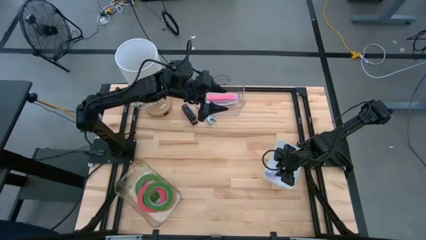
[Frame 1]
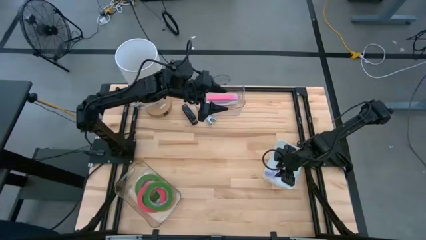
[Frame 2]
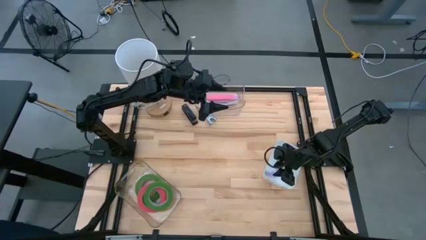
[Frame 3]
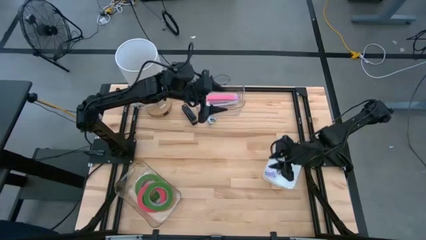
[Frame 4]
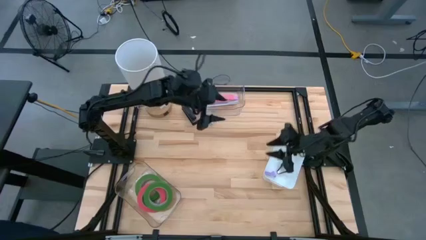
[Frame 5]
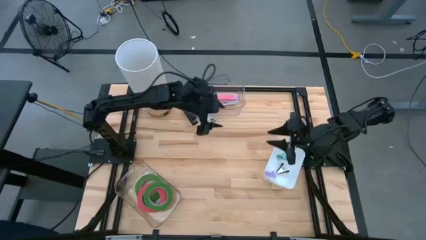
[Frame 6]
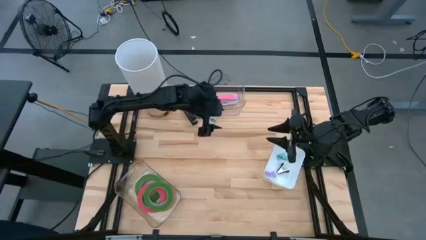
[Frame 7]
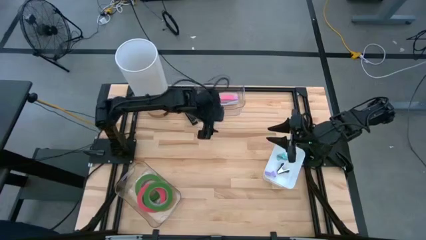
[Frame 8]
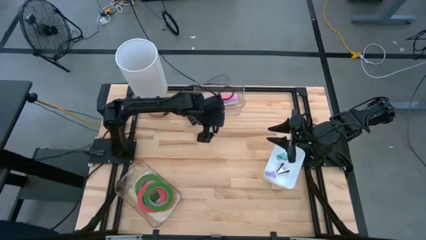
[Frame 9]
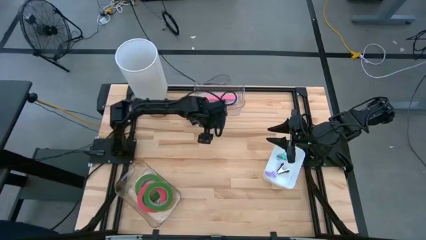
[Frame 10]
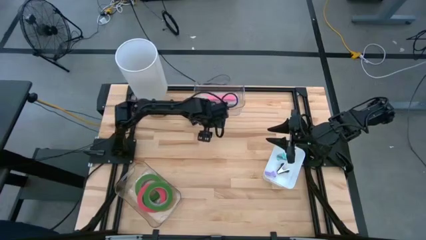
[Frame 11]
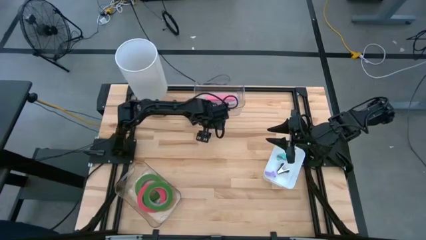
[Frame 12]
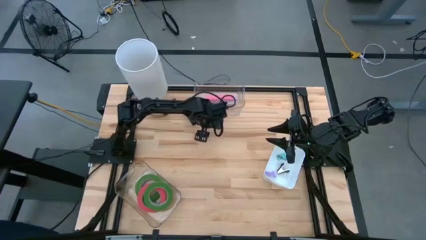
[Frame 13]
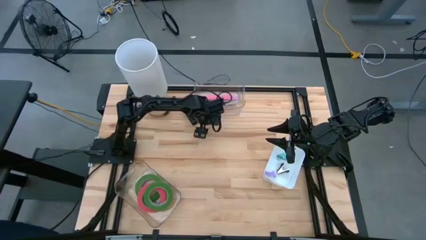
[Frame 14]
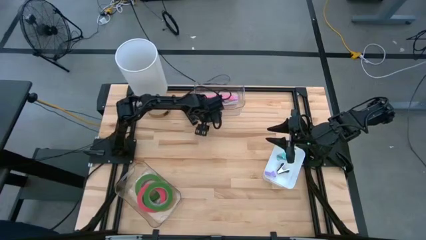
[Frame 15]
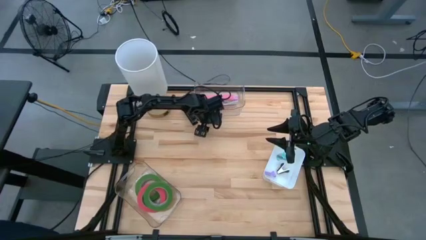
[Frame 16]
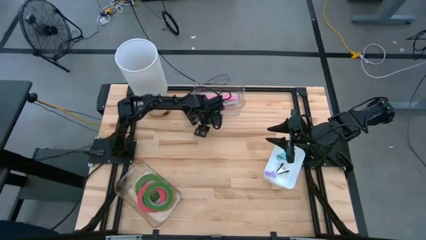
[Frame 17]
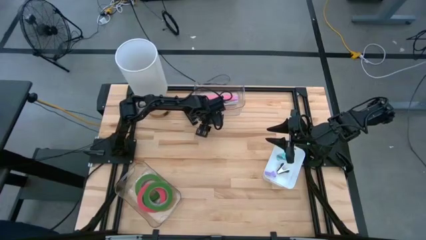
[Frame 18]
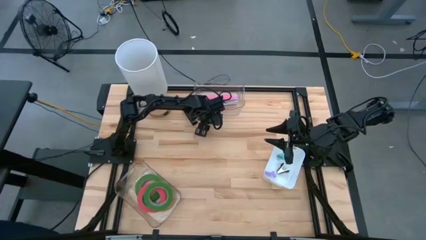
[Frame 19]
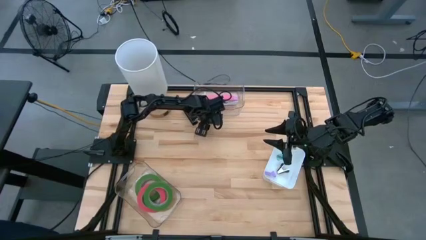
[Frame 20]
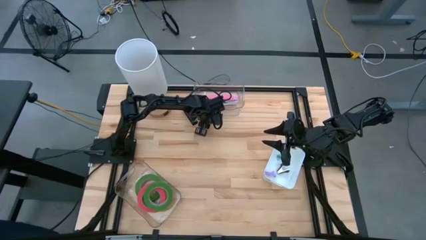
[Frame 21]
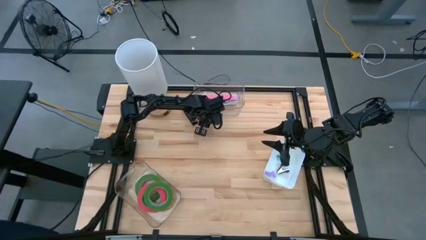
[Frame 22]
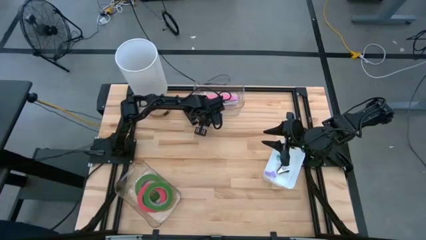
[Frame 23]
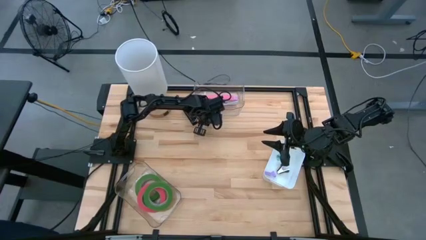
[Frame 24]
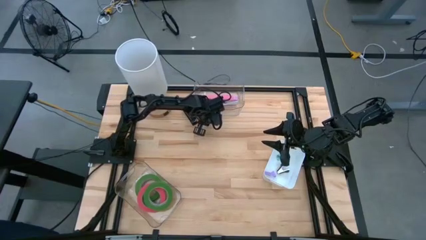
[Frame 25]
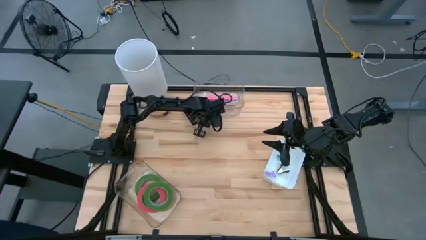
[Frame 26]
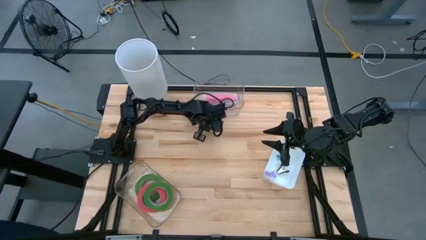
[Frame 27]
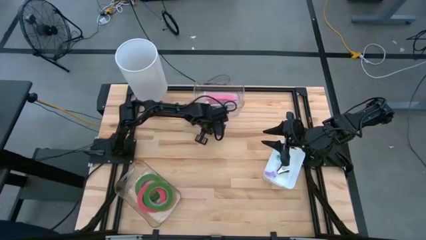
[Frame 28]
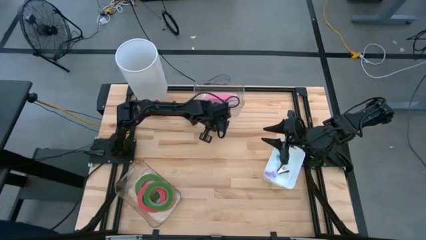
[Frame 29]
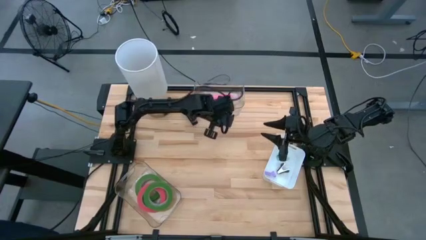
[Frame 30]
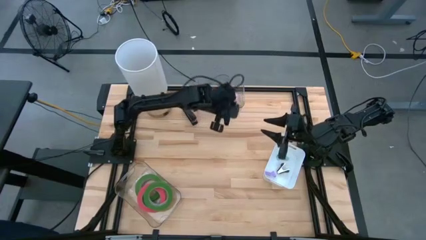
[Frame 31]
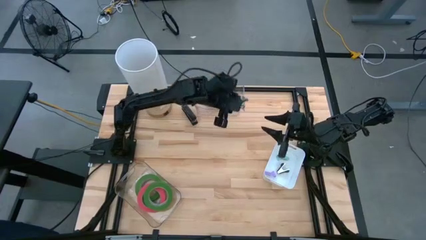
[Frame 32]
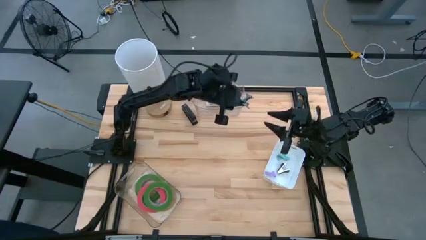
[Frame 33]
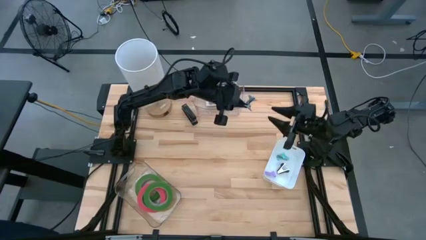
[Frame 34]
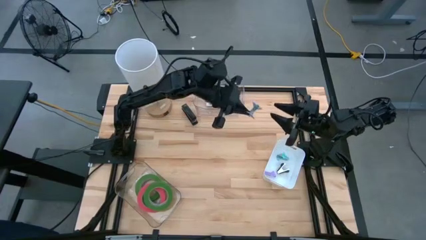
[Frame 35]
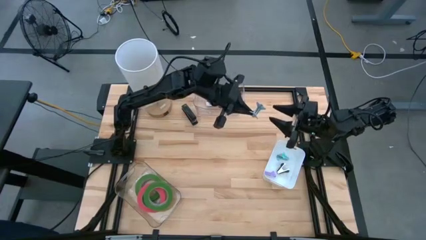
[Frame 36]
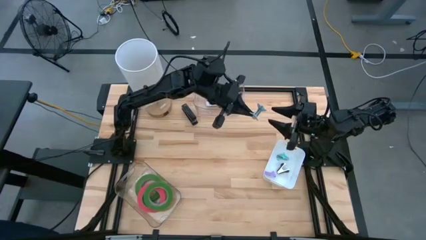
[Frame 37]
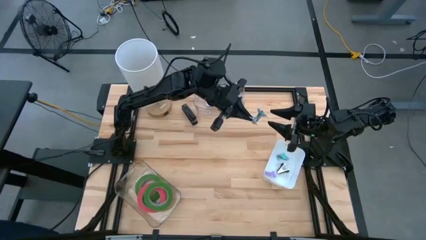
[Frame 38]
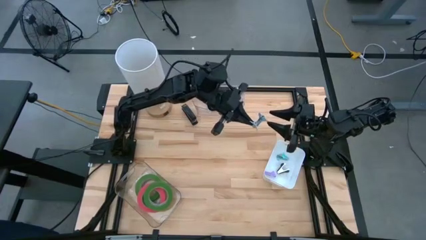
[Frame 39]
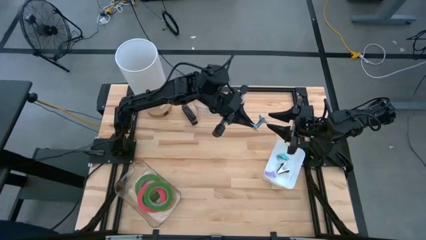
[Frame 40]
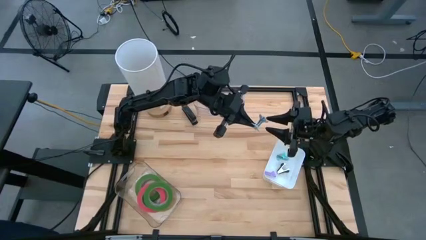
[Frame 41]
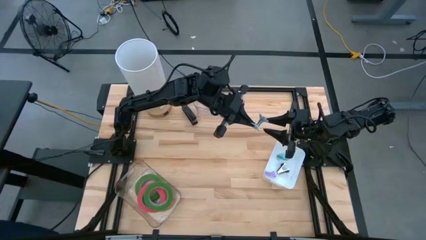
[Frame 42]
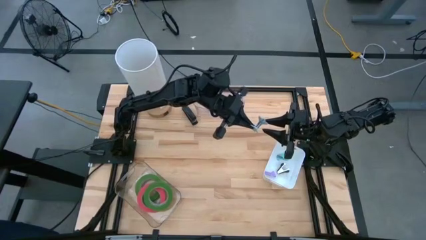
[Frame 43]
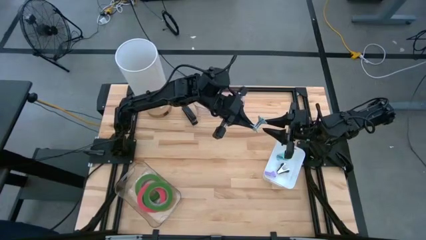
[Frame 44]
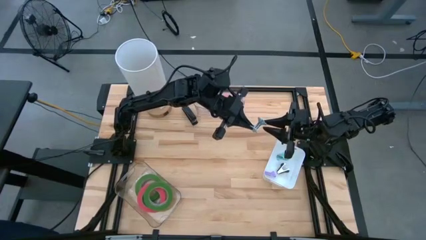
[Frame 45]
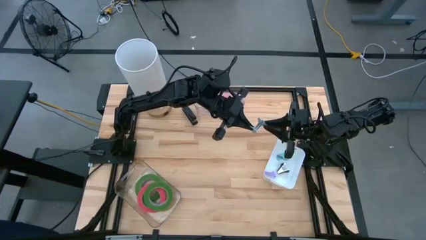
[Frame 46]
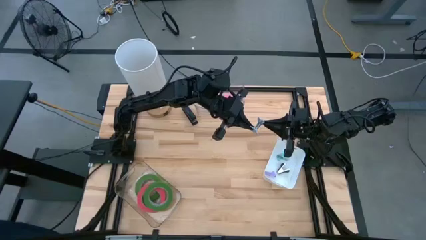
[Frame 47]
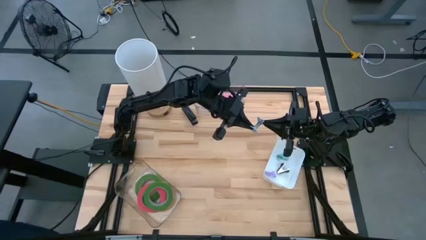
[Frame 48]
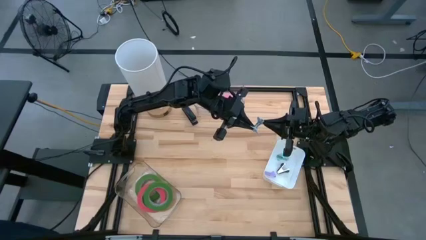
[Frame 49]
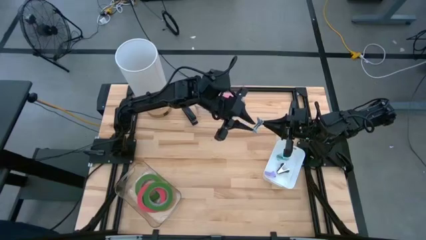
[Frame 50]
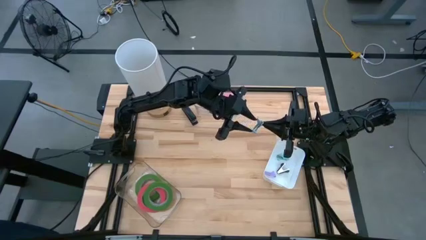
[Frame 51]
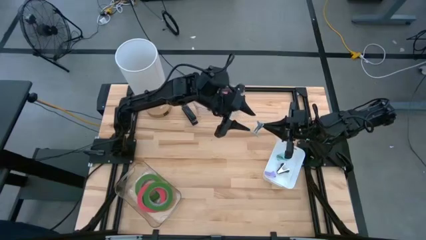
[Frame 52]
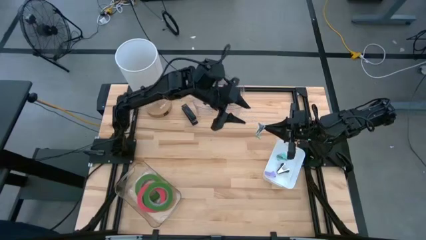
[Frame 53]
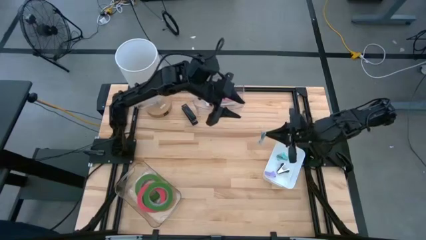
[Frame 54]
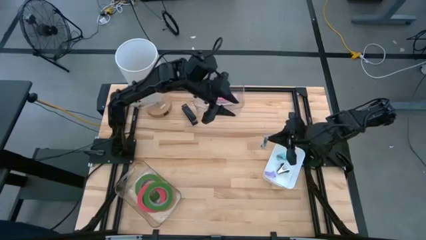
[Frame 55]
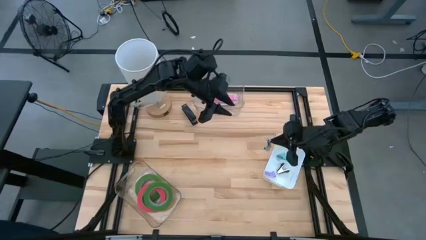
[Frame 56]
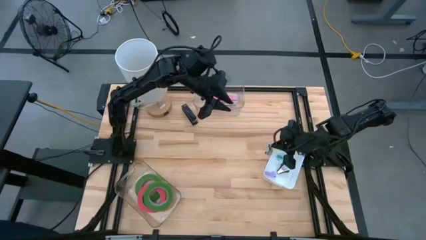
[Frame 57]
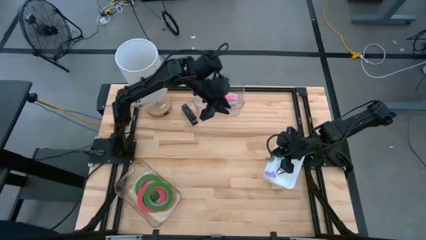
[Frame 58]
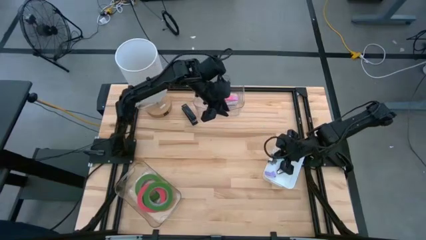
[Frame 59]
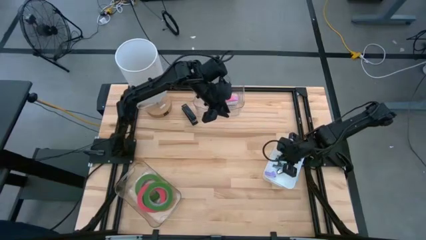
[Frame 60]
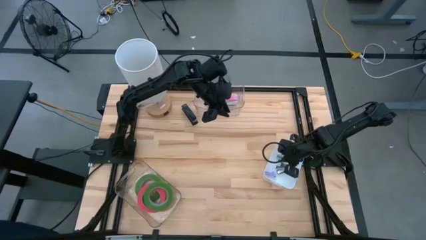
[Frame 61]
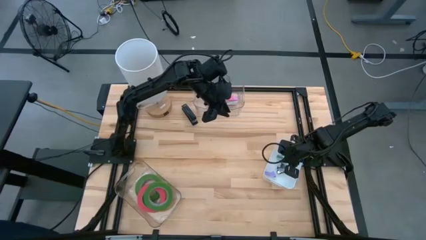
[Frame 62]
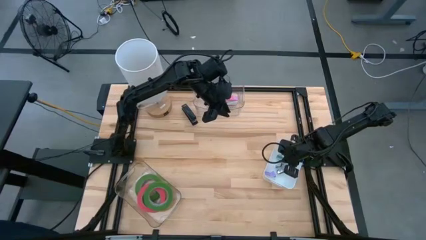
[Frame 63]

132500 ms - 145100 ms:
Task: Pick and place Stapler, Stapler remover, tape
Put the blue staple remover into the white bin

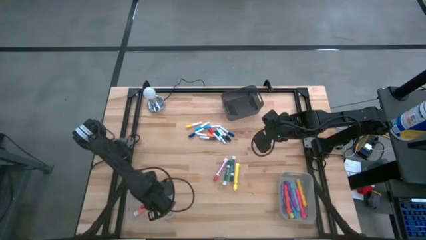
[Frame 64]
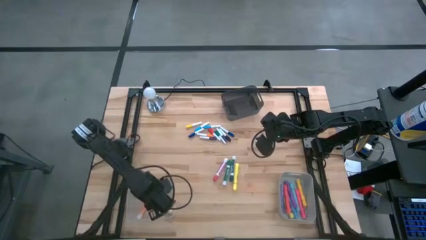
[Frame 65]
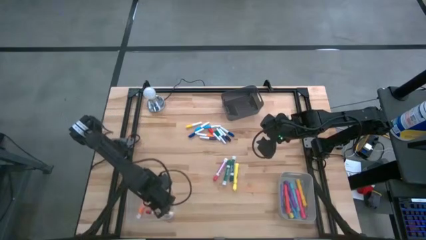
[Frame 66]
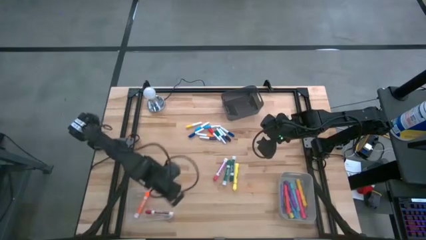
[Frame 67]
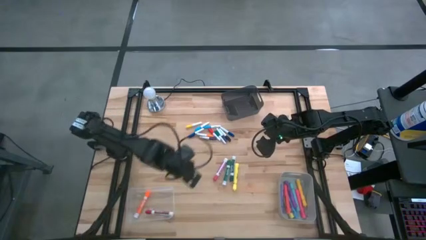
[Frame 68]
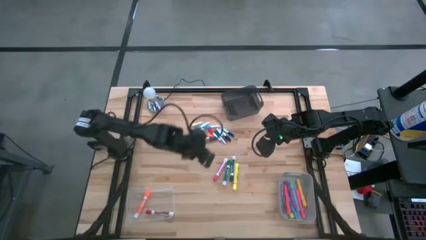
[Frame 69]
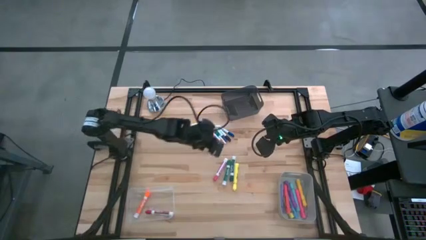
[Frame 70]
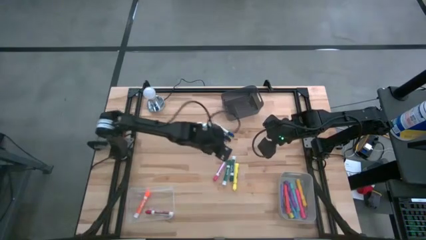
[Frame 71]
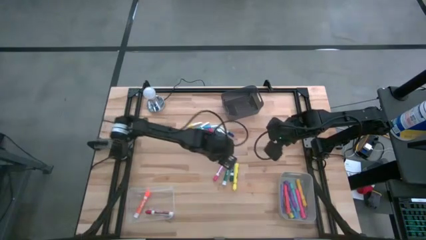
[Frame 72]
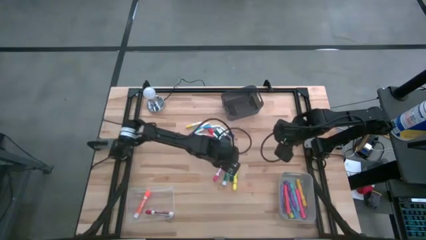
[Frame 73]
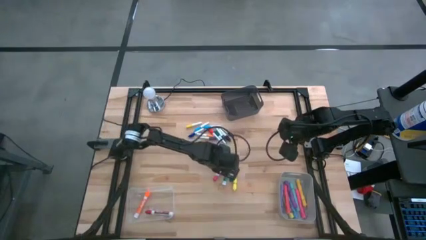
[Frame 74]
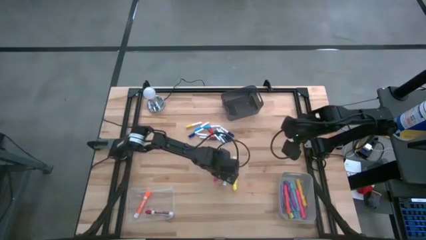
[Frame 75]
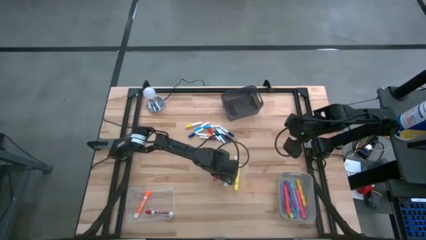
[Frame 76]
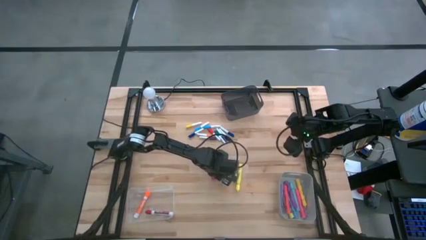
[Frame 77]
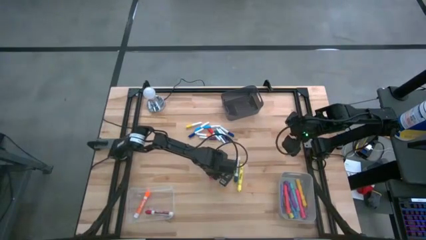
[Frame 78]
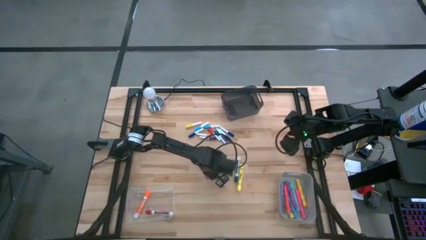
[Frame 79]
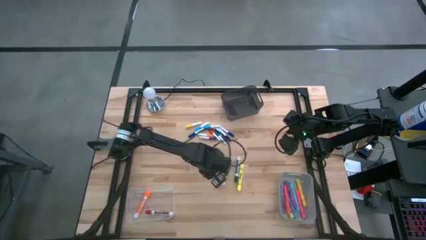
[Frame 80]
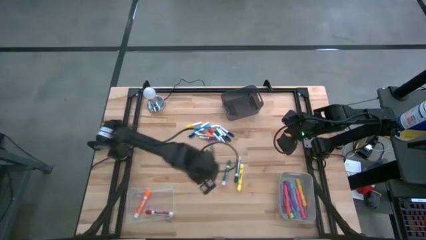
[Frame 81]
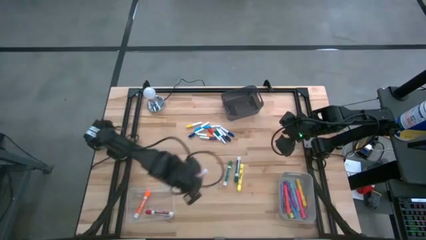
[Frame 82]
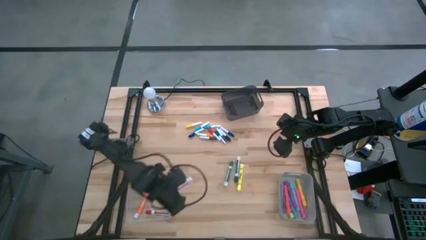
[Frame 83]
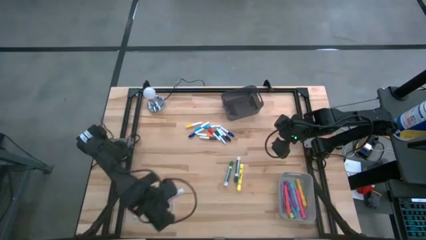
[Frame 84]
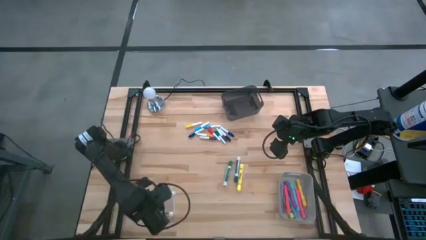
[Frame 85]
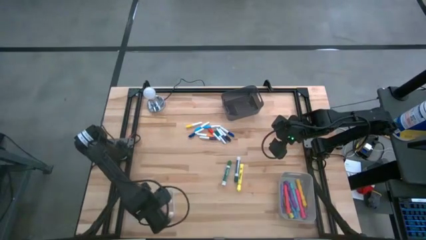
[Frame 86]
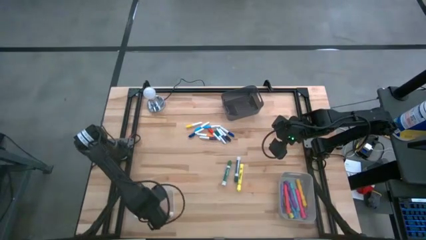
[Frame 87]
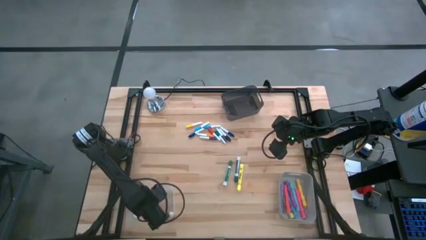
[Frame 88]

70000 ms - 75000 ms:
Task: Pick & Place Markers
Put the pink marker pen into the transparent bin
